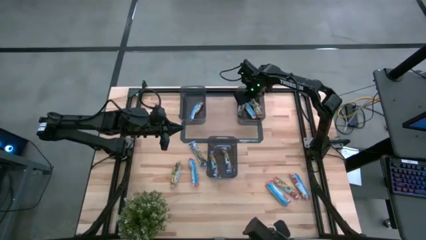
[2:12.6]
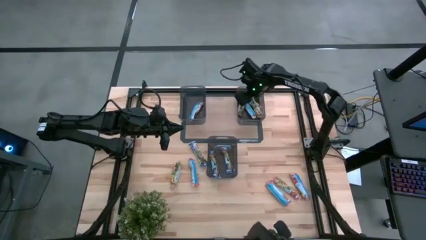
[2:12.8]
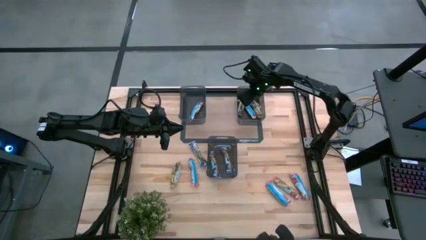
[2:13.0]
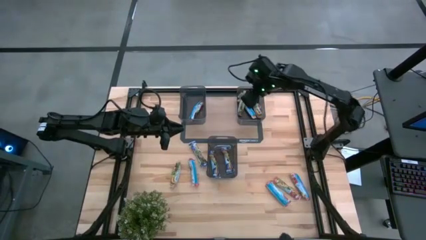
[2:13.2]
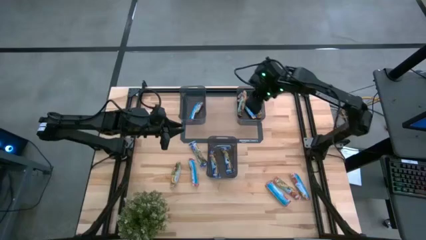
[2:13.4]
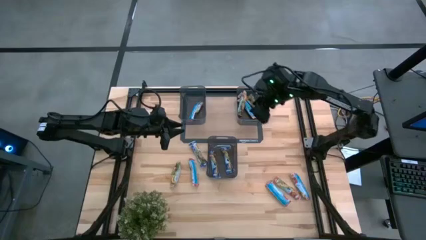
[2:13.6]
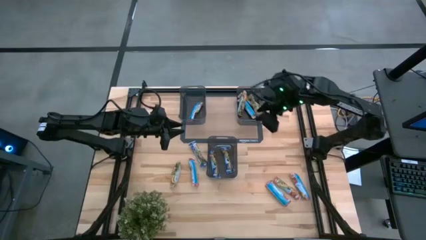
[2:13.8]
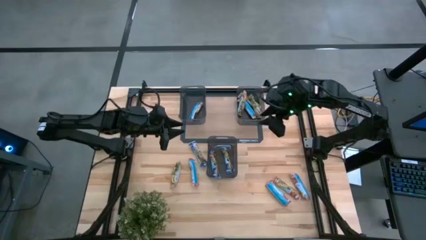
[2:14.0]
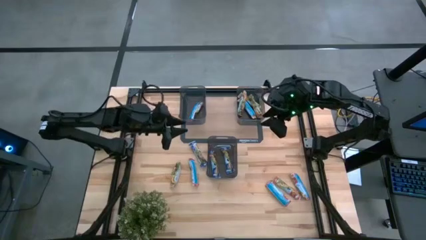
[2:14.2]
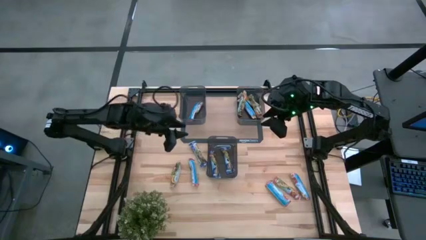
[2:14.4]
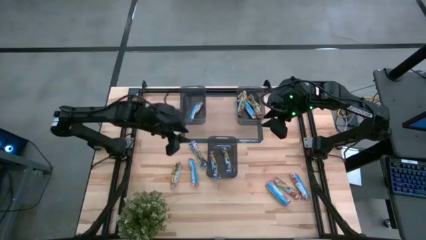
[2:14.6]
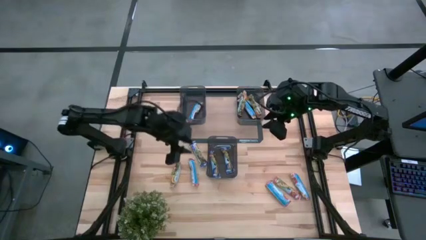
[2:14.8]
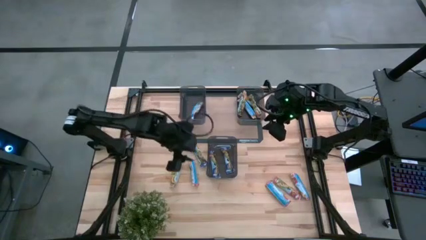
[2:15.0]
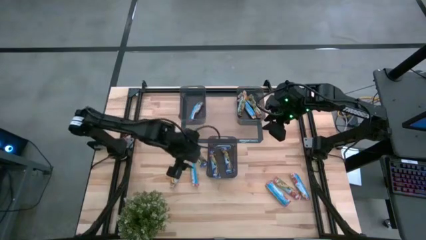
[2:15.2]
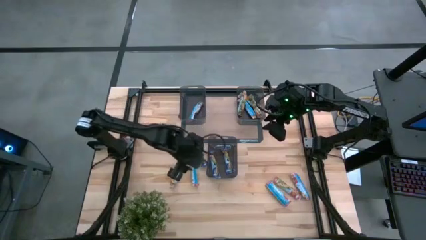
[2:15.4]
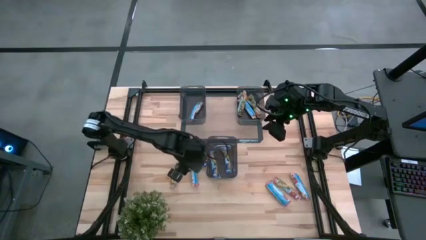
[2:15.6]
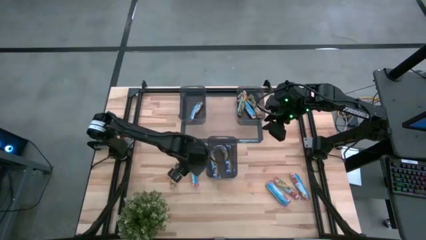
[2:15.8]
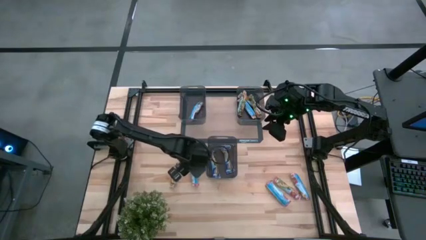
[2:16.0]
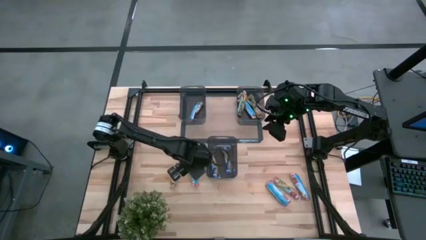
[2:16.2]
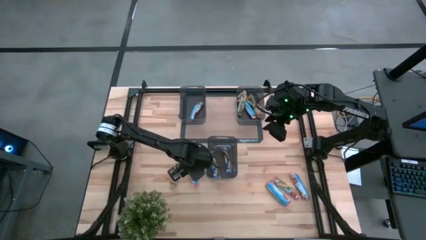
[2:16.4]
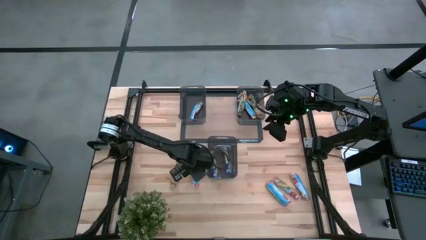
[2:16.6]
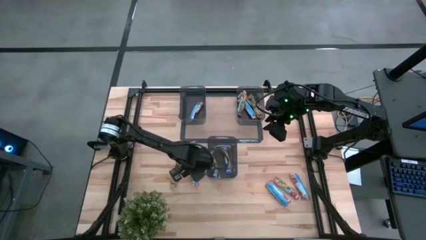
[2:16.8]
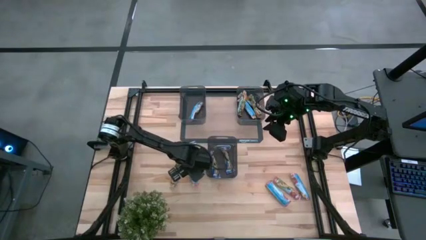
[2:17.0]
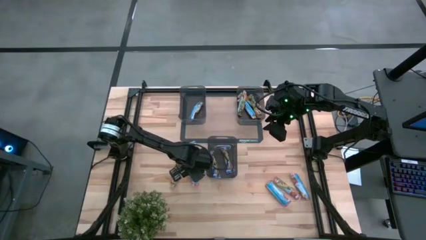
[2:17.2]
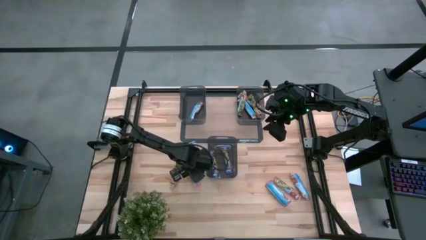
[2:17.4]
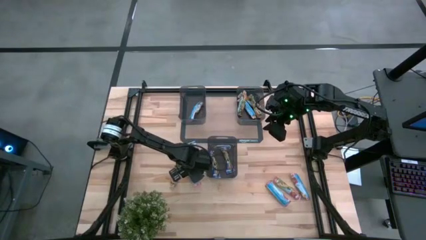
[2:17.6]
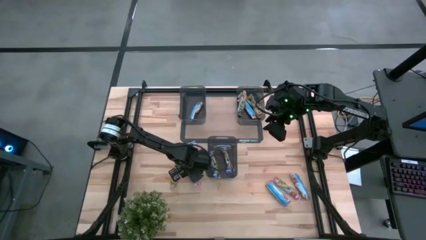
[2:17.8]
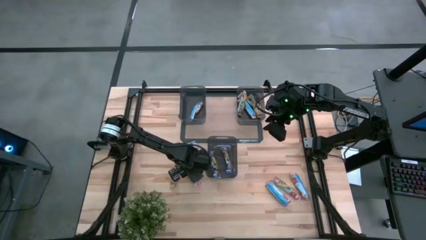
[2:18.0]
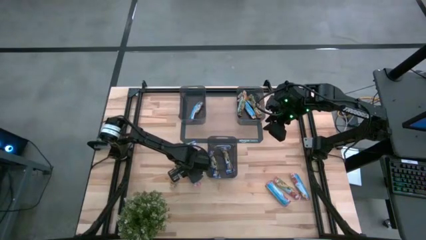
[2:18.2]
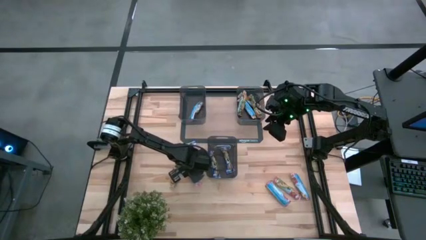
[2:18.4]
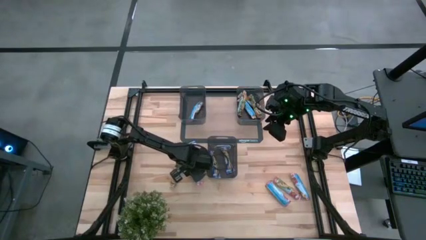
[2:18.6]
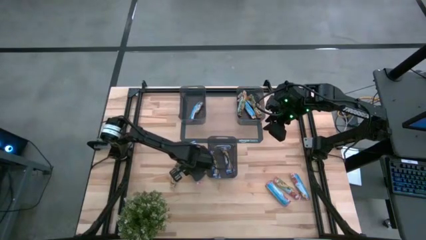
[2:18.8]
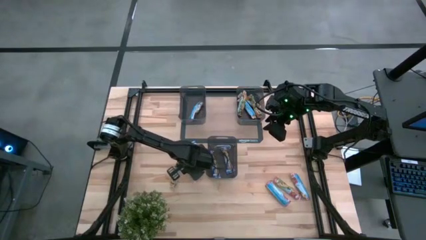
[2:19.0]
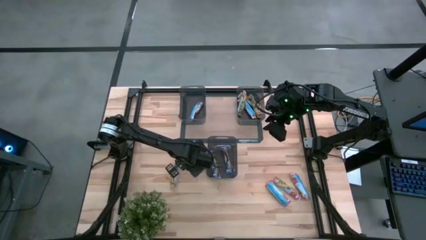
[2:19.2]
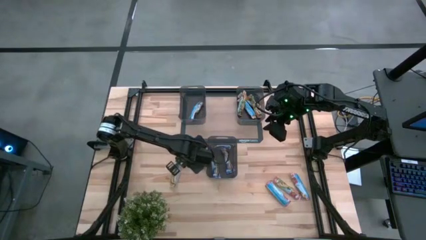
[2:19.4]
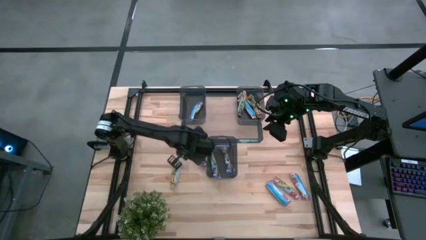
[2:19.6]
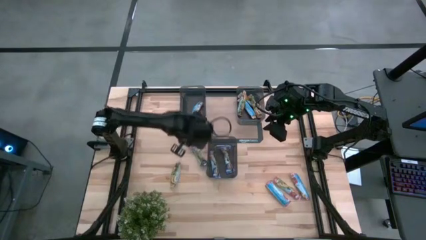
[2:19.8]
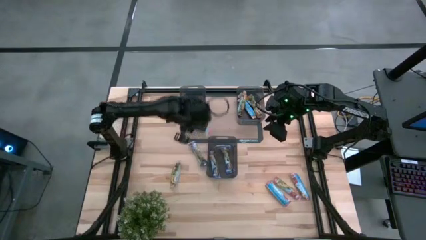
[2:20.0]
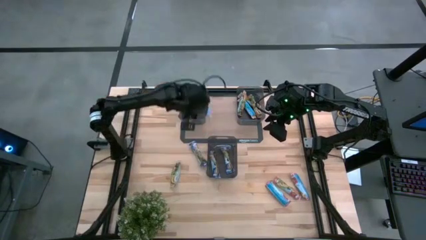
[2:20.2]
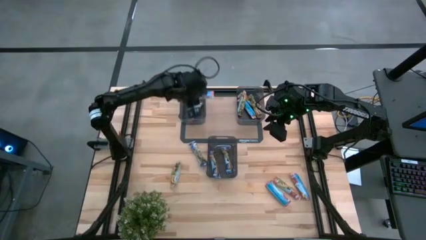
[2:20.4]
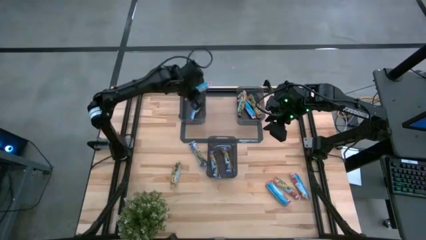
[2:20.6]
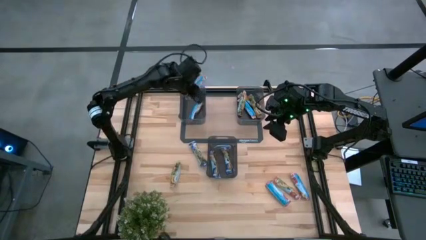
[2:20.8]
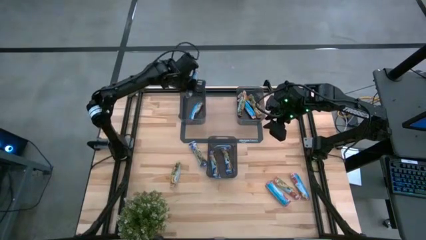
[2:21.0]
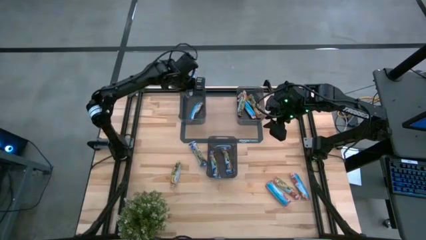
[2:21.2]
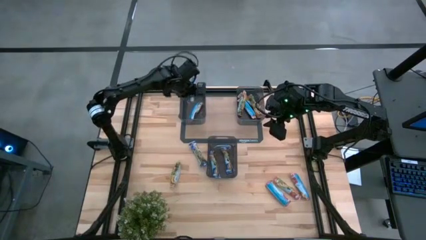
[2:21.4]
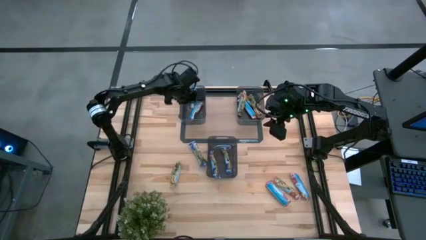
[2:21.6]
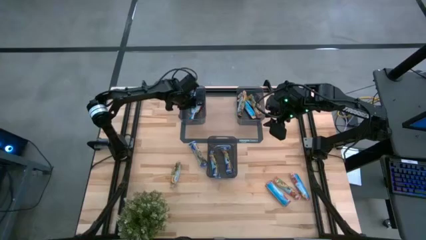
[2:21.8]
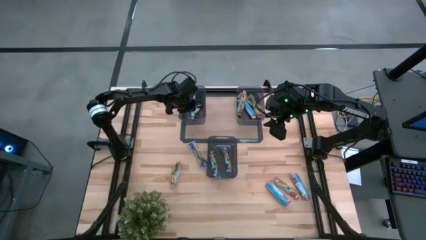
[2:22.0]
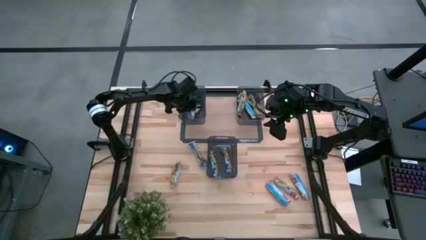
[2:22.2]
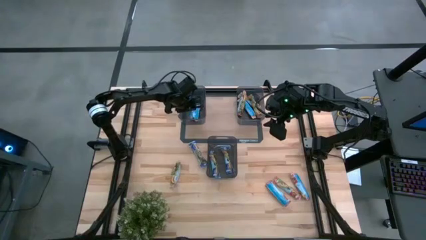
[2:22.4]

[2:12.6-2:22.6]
Task: Pick and place Granola Bars by type
Put the red granola bar into the left black bin

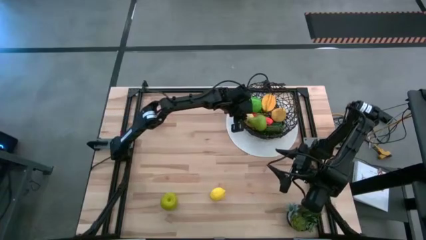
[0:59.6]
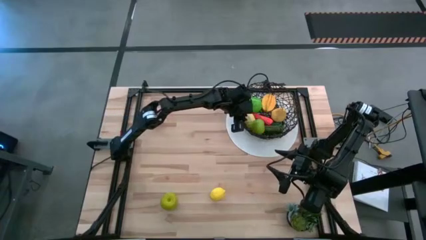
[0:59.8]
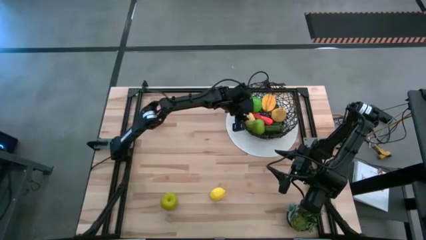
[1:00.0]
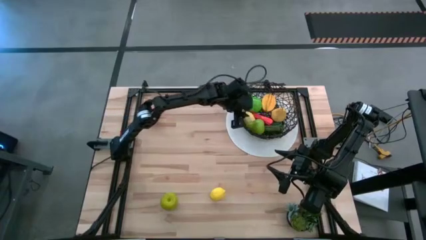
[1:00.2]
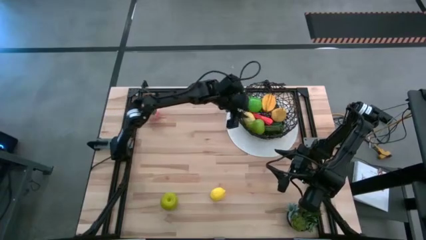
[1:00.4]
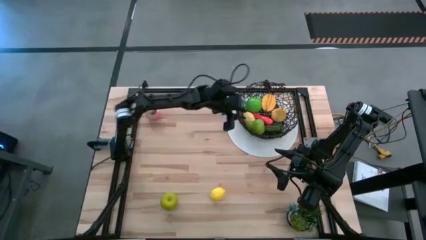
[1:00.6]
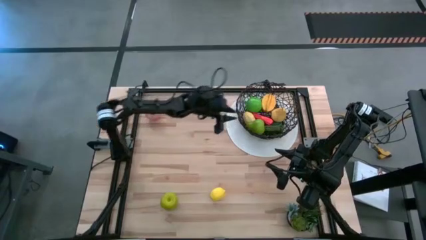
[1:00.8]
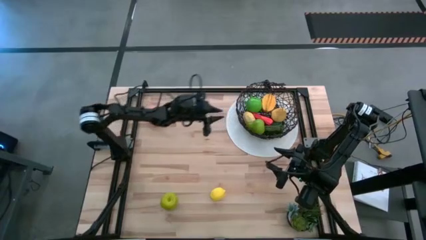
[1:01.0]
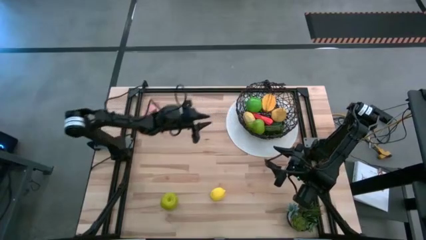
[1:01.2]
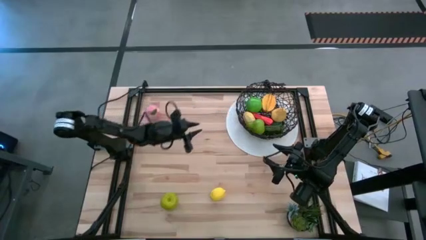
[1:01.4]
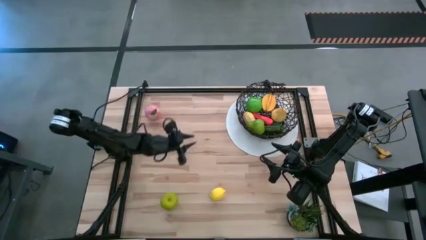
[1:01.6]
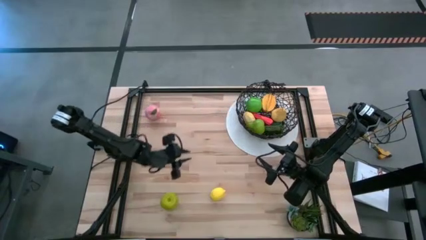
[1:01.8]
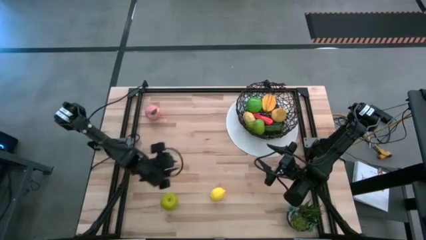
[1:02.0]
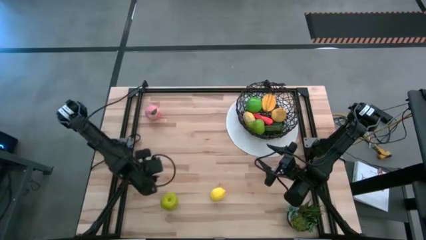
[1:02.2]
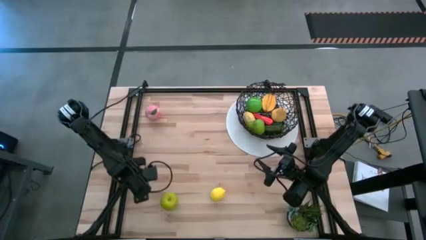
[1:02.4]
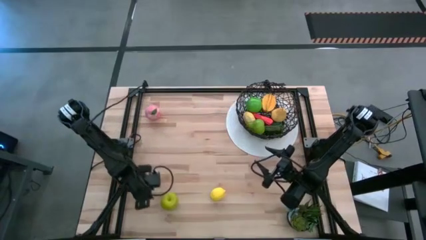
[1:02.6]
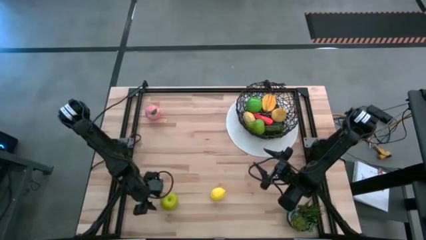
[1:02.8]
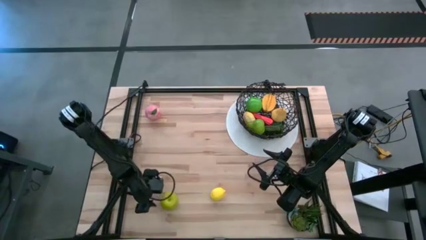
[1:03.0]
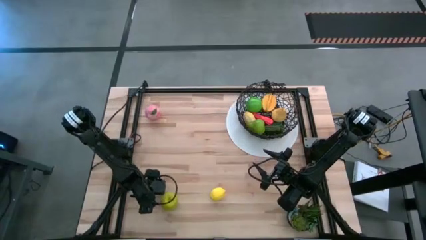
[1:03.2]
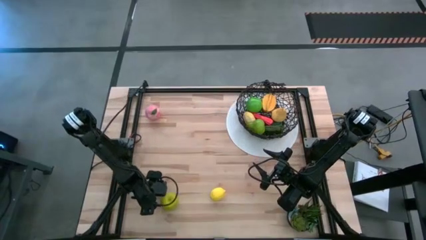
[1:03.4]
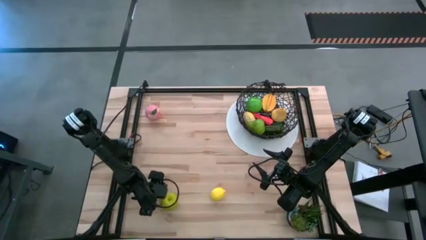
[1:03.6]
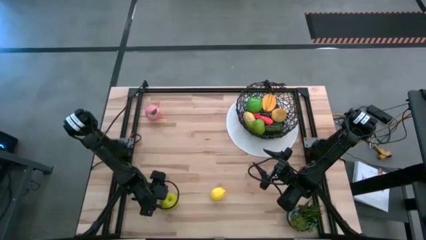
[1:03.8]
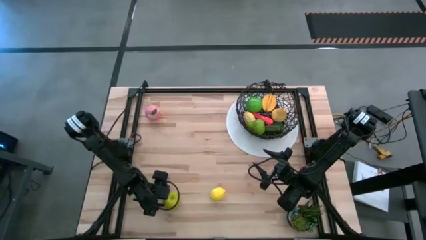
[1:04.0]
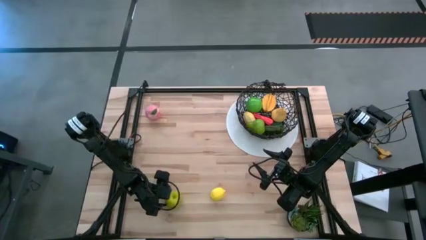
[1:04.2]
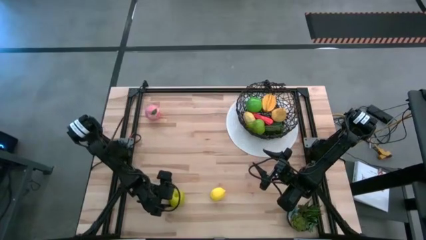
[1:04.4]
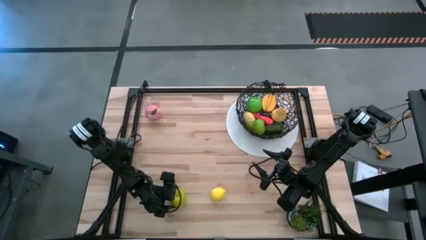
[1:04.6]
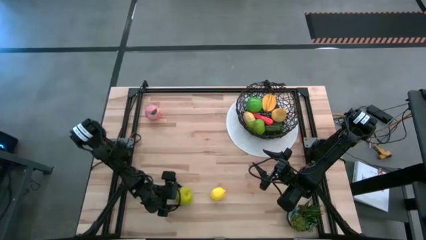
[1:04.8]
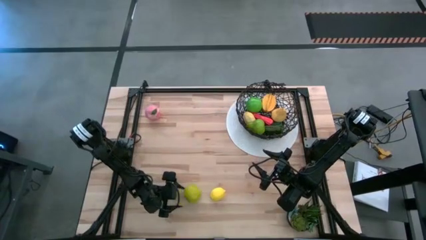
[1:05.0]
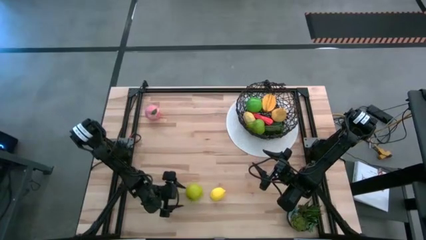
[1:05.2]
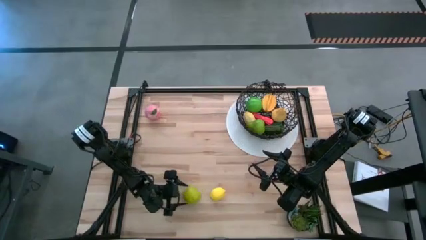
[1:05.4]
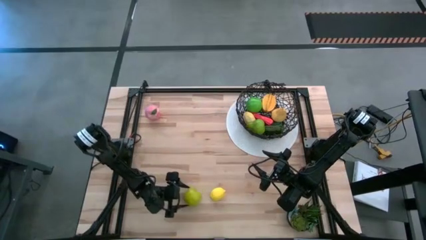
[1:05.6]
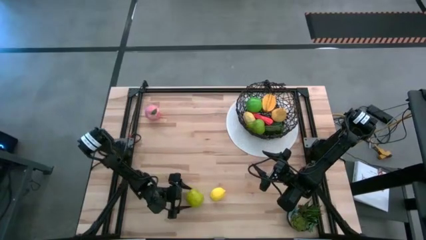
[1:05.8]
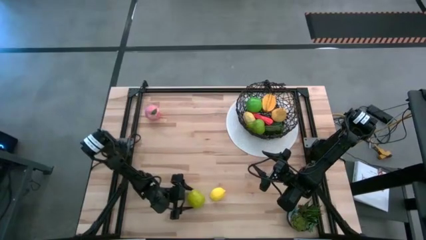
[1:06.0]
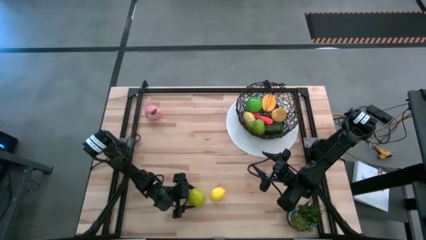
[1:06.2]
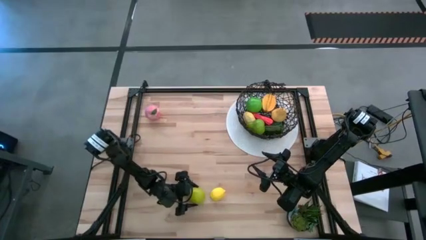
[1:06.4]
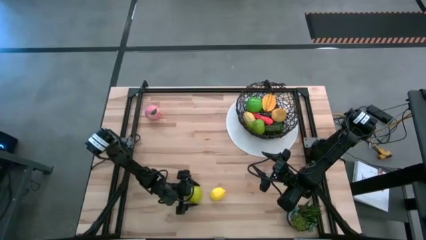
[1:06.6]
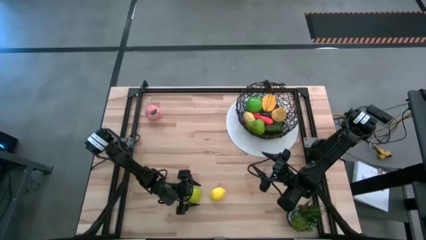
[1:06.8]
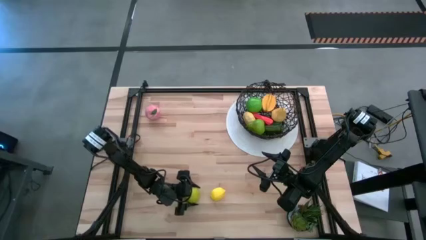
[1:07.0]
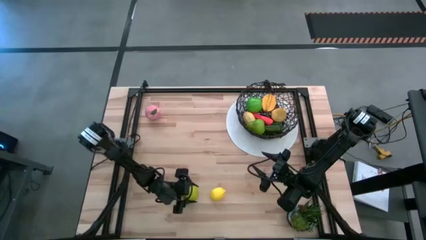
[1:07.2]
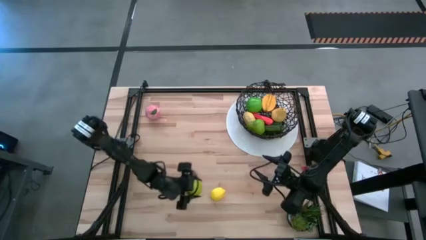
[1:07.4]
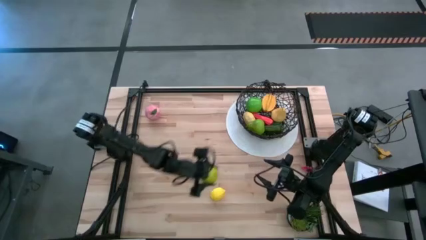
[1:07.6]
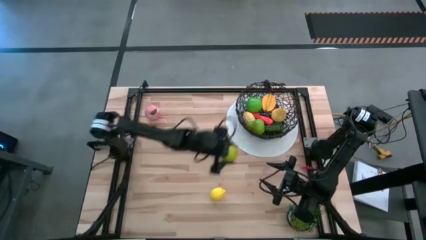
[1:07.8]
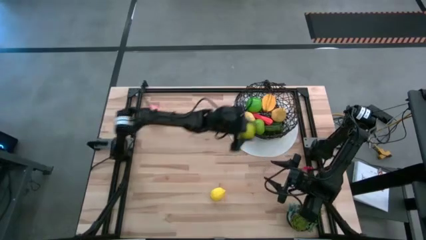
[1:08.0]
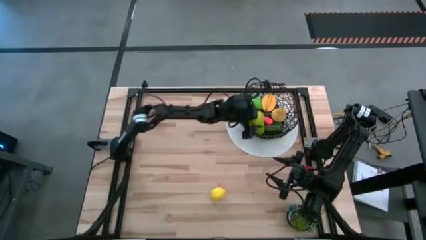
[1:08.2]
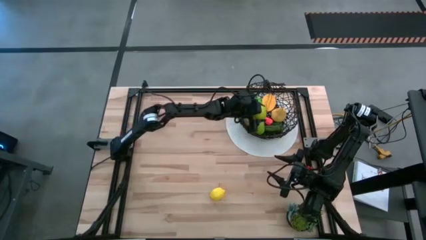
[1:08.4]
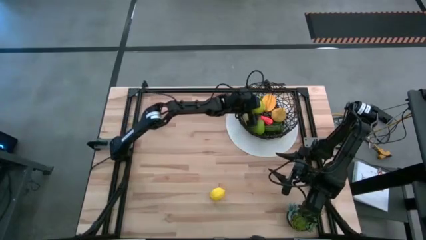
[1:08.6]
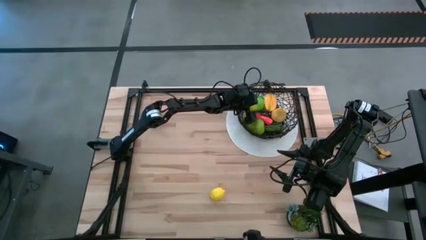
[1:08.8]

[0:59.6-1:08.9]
Task: Build produce basket
Put the light green apple into the black wire basket
